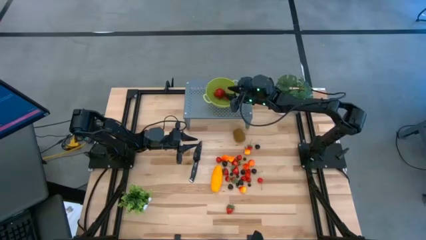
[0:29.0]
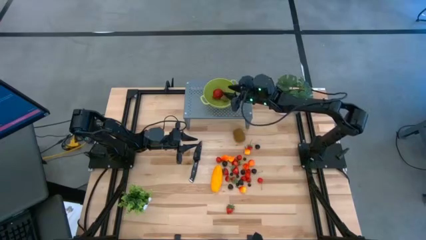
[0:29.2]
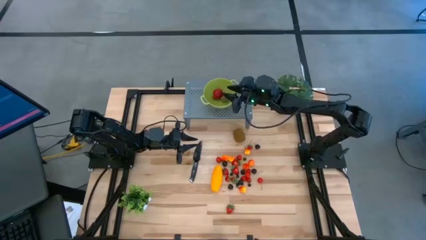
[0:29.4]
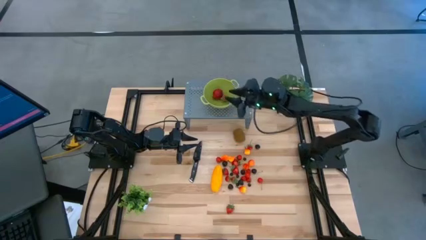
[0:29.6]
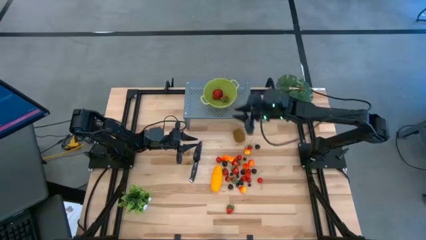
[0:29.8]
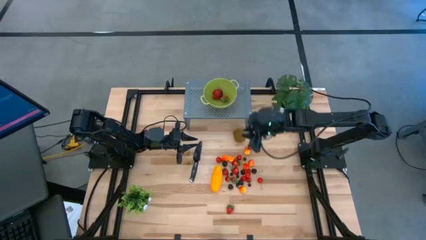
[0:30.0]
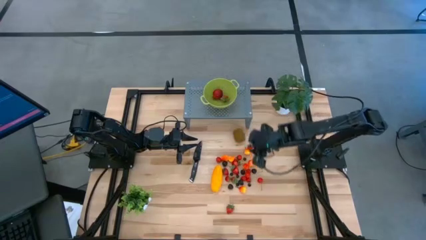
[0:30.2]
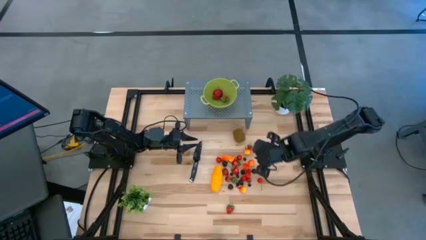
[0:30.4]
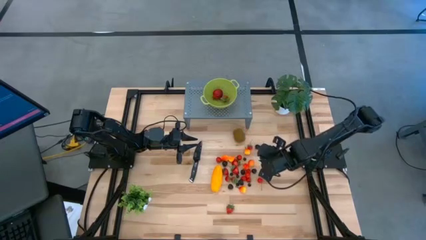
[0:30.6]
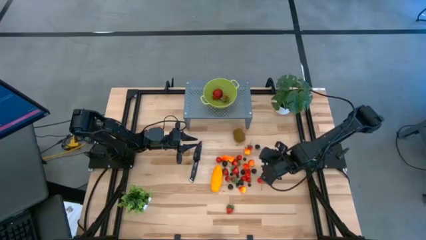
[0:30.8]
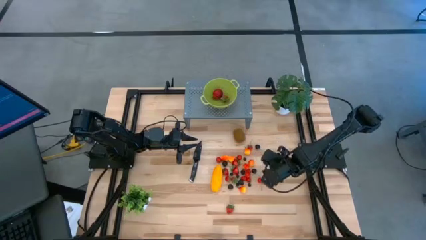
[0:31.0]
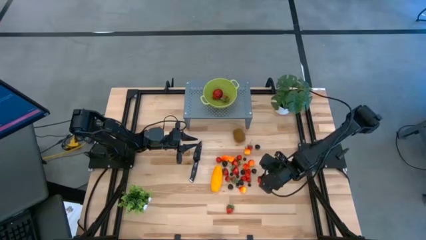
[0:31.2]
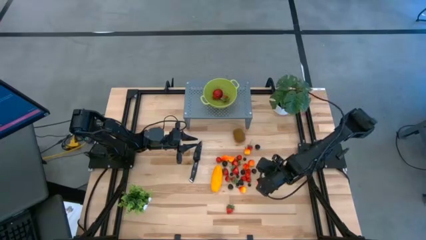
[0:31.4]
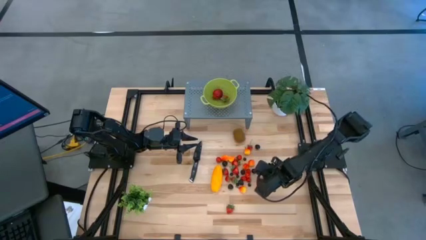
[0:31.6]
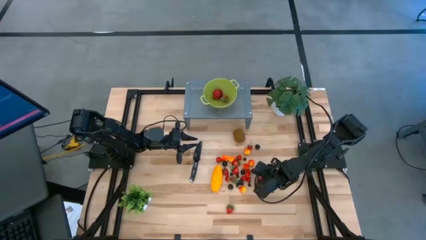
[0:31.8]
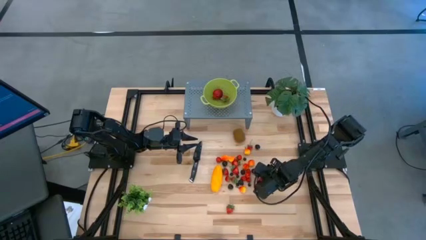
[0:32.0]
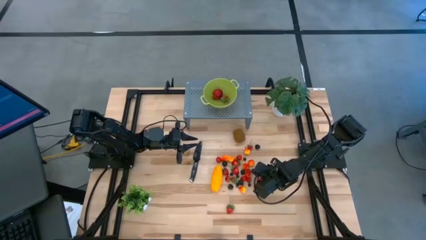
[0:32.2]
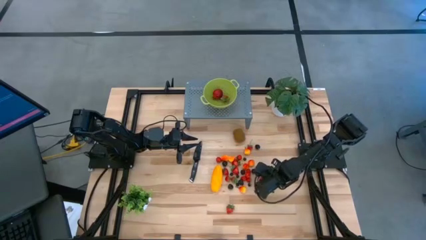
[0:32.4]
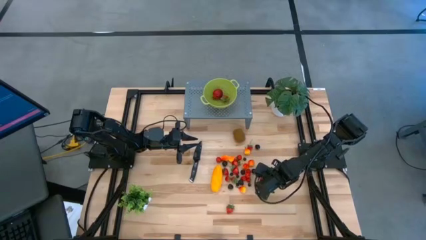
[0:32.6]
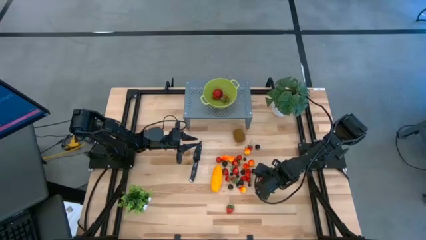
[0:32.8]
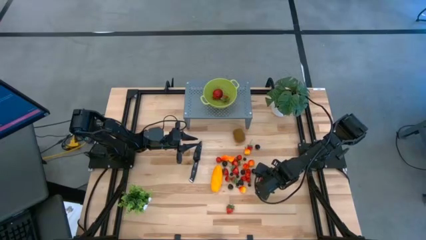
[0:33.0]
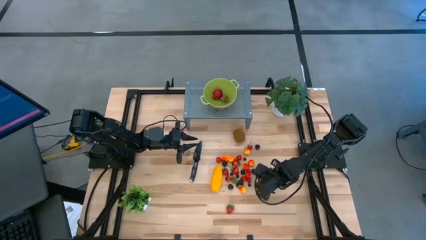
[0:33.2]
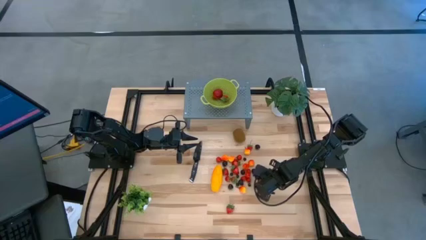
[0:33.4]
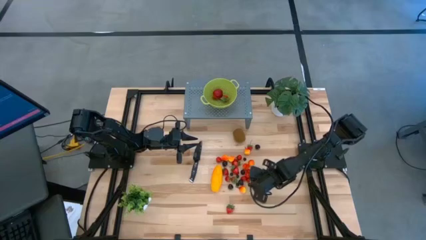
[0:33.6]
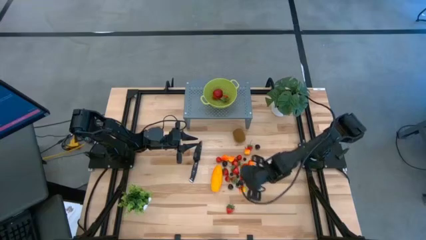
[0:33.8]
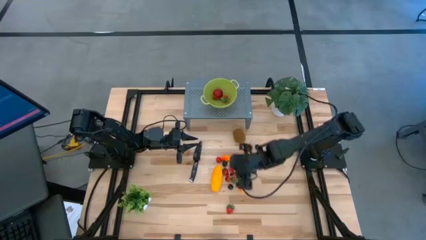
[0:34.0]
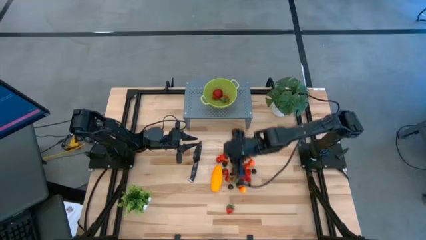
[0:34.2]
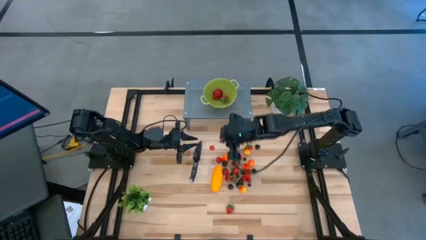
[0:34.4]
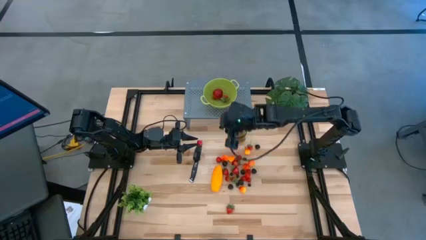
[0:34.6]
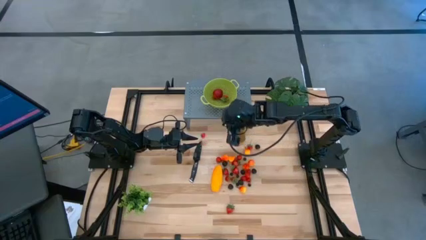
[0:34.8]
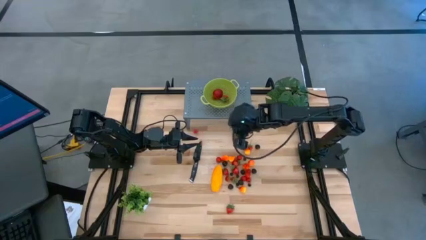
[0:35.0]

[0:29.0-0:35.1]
Task: Pick & Place Fruit
Put the red cherry into the green strainer bowl on the shelf

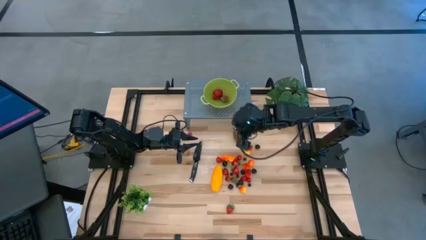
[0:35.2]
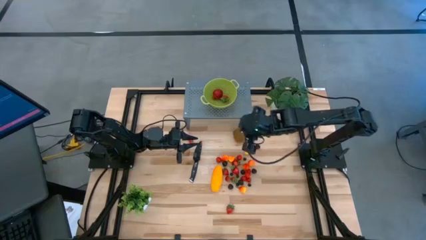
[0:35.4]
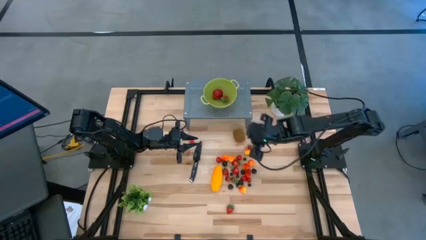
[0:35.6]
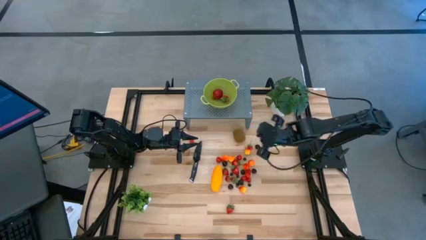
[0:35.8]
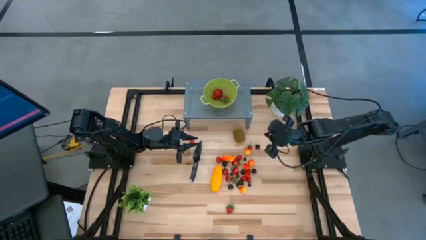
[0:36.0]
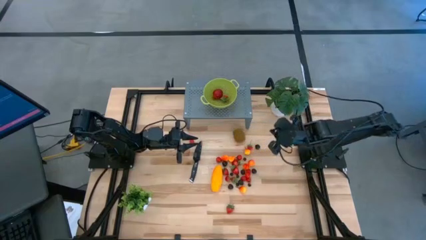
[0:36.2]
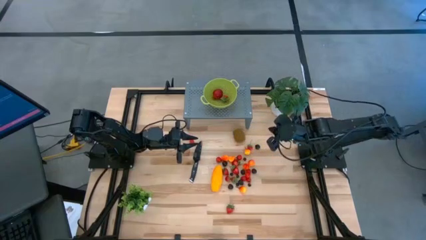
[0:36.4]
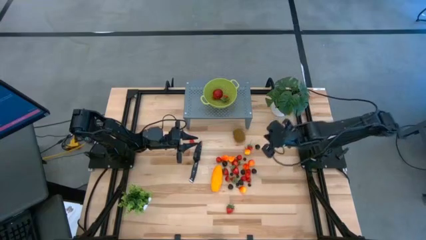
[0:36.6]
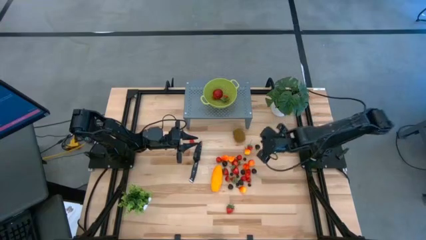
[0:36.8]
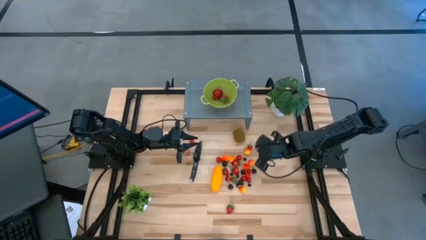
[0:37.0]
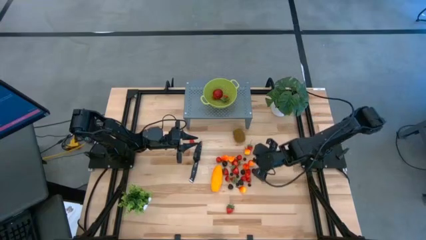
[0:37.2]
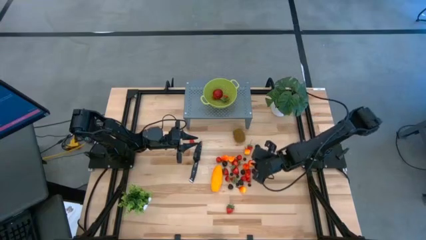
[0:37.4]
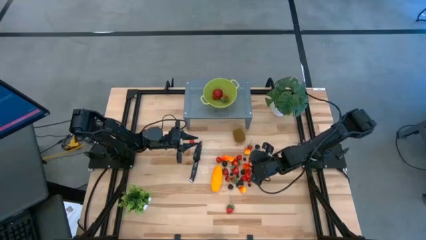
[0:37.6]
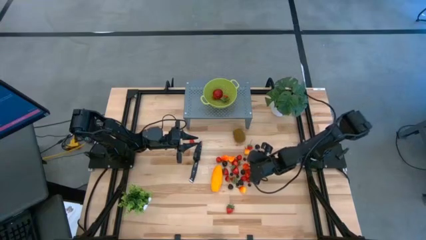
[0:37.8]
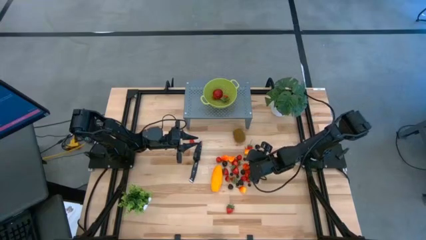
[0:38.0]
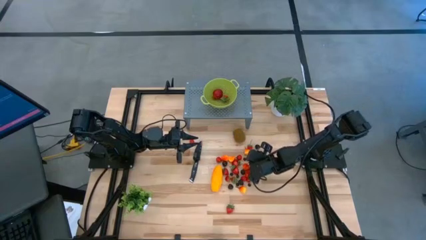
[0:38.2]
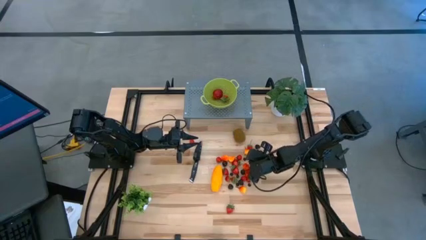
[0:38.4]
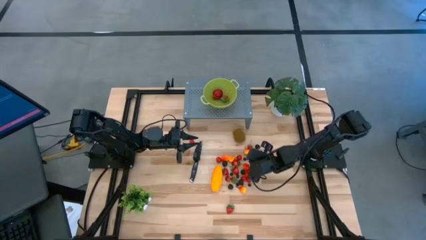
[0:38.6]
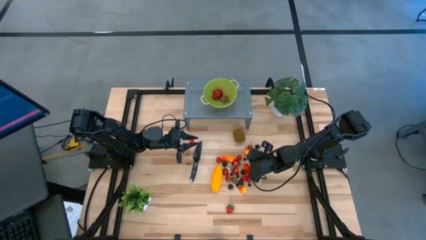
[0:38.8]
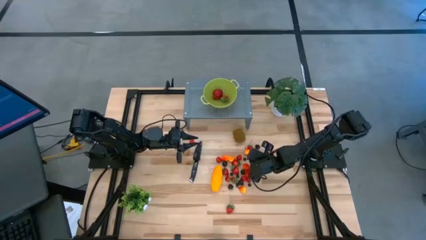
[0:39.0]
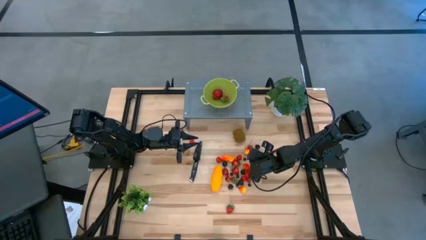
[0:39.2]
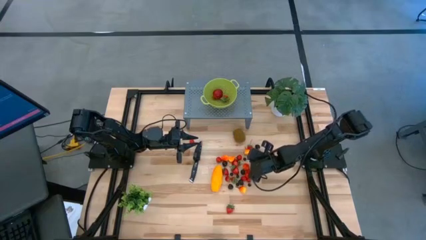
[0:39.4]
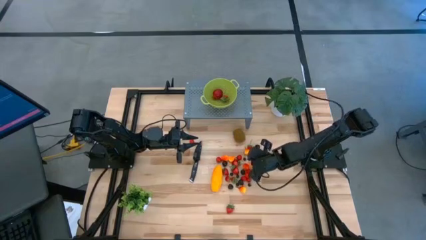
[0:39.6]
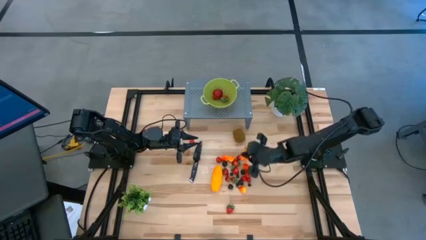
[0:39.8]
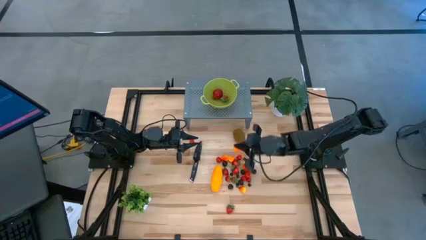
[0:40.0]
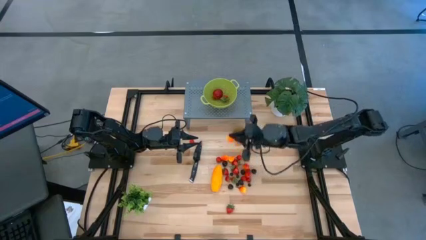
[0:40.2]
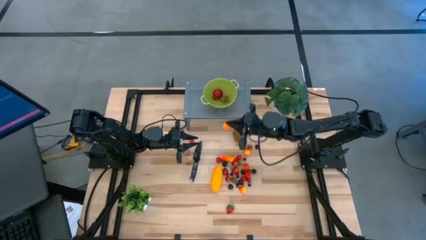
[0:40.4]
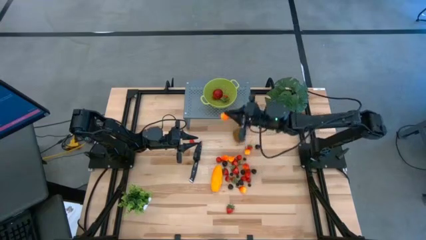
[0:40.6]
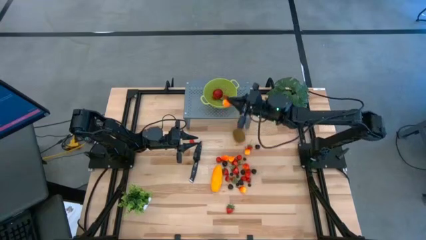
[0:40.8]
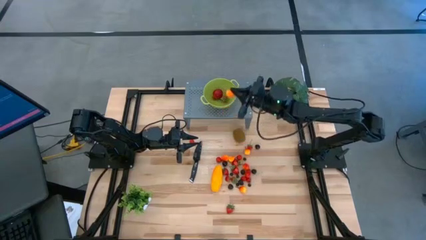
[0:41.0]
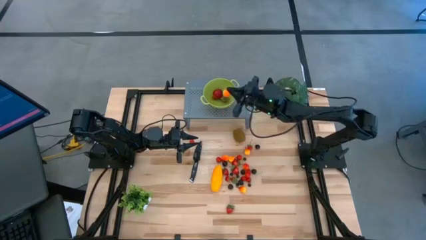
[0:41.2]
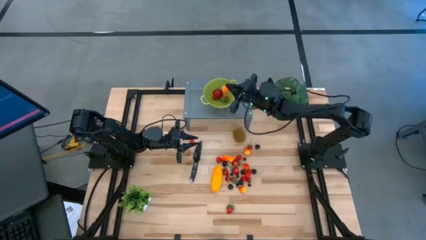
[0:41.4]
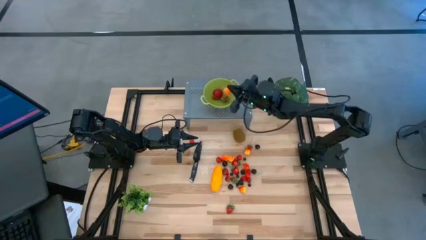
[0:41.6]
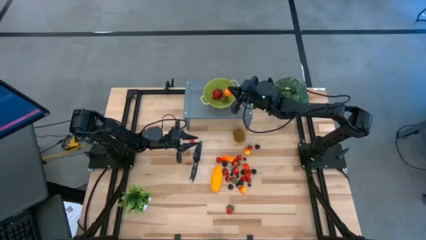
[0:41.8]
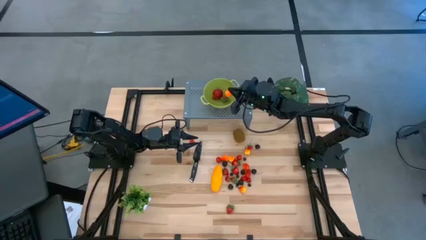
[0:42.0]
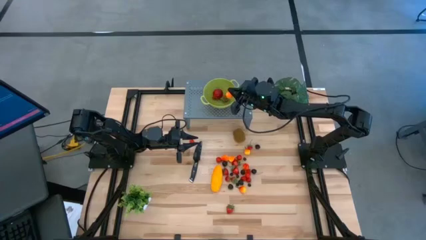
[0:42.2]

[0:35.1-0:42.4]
Put the peach into the green strainer bowl on the shelf

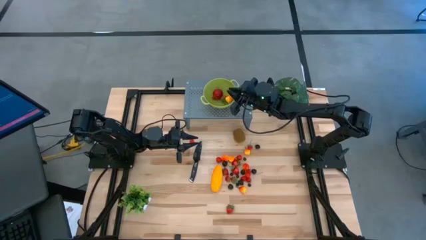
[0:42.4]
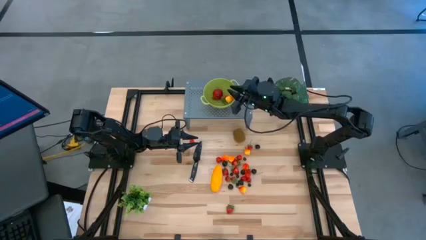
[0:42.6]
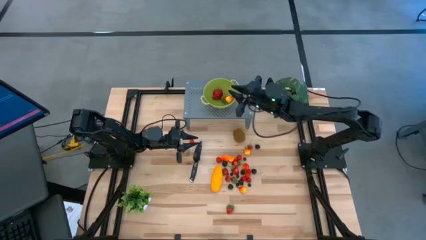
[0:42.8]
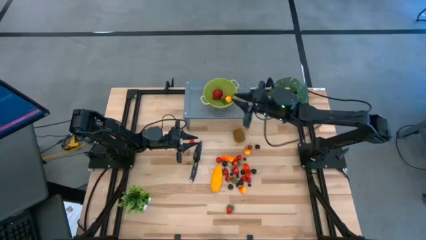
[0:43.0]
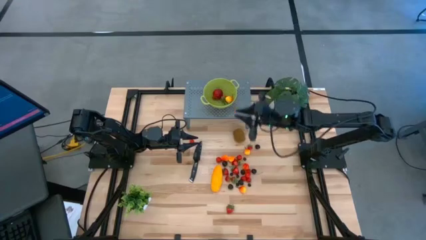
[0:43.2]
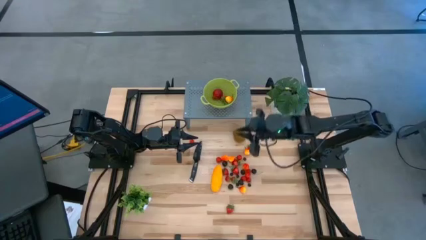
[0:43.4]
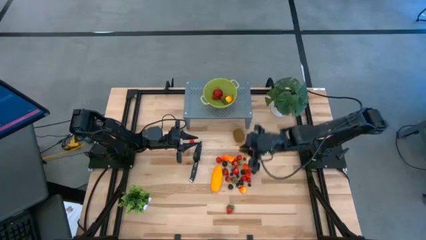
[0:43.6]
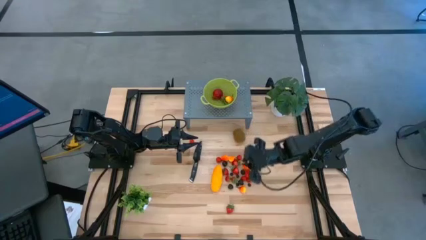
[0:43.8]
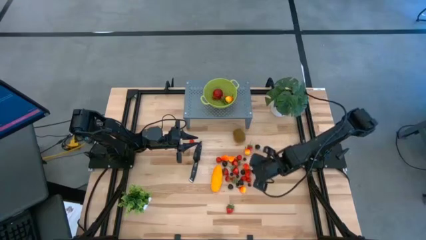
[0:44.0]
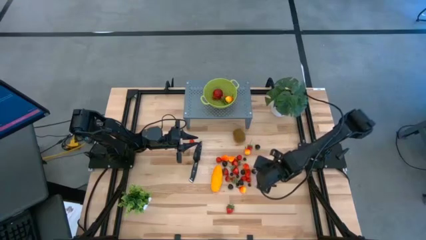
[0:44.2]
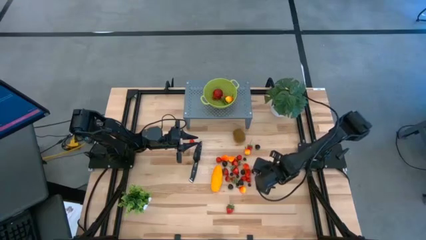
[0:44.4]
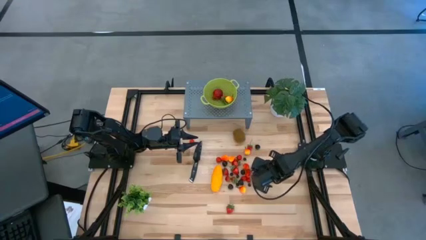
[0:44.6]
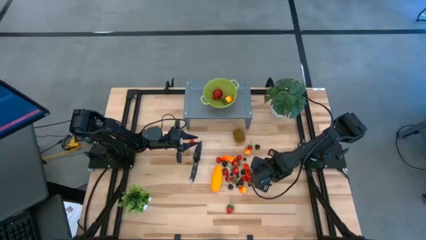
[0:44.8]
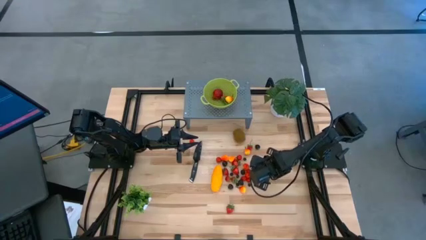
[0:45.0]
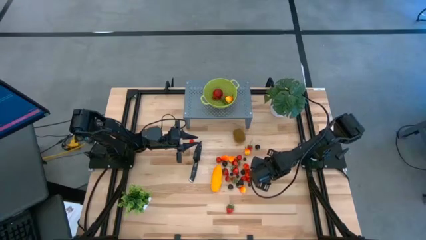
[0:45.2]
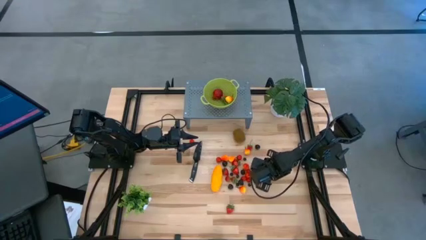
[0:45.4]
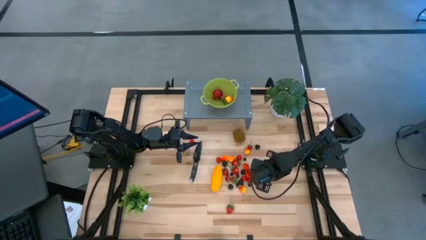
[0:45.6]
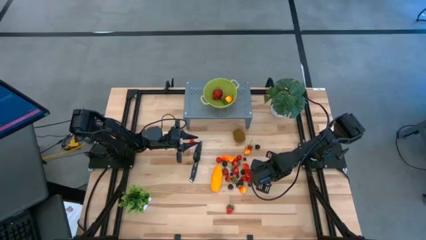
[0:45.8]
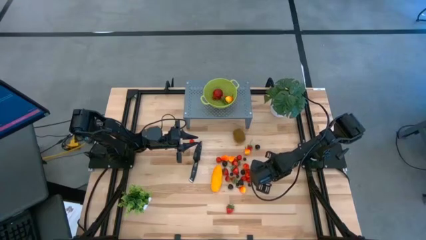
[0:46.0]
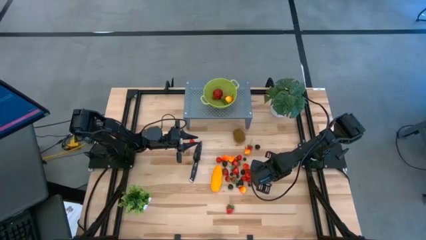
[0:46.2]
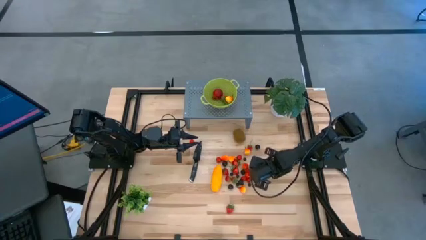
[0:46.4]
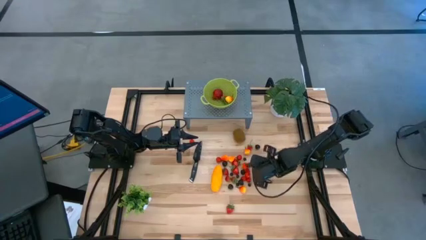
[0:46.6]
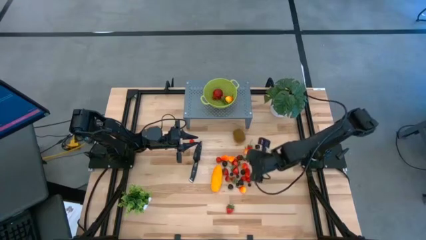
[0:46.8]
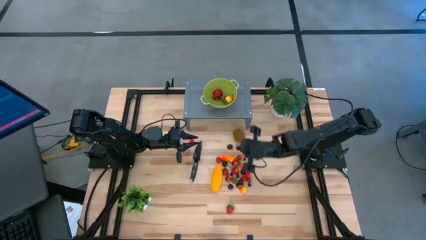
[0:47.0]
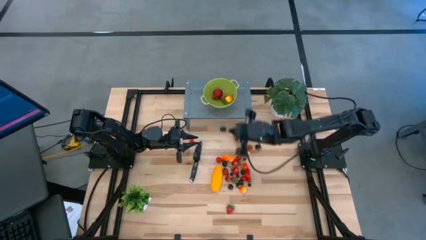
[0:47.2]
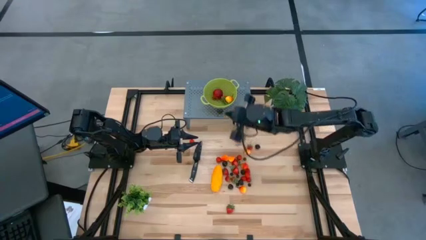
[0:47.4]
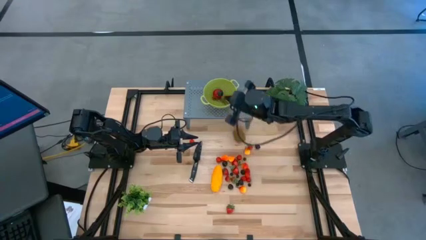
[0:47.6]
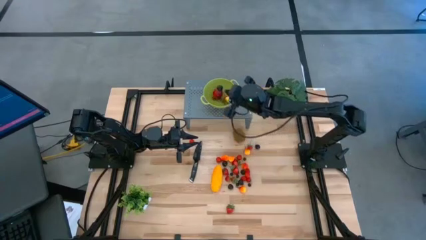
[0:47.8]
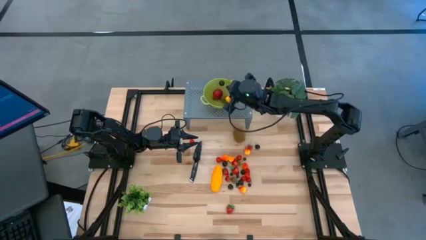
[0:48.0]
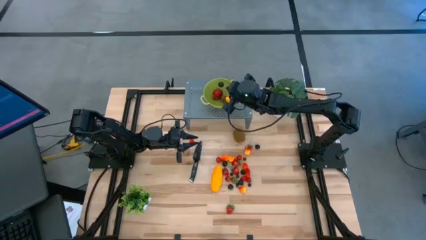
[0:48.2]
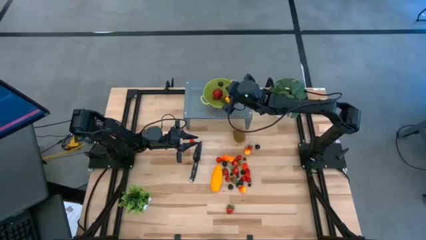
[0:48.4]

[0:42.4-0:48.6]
Put the black cherry into the green strainer bowl on the shelf
